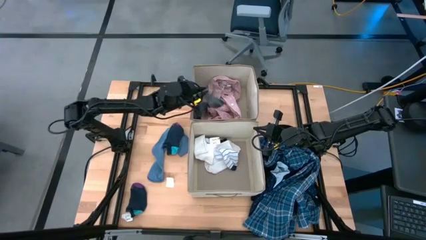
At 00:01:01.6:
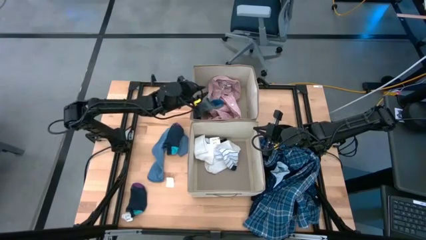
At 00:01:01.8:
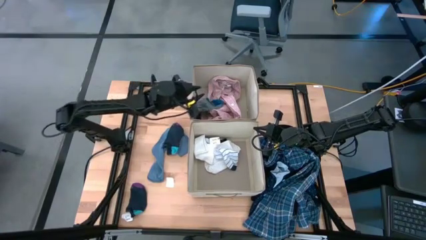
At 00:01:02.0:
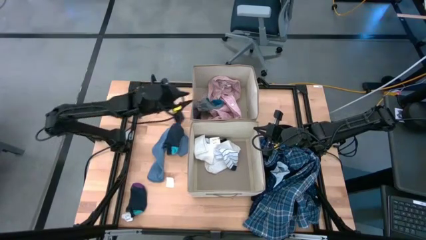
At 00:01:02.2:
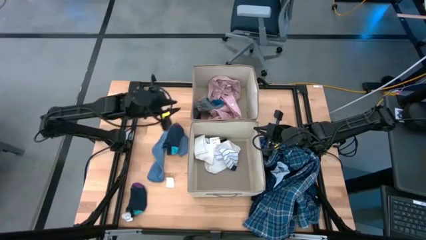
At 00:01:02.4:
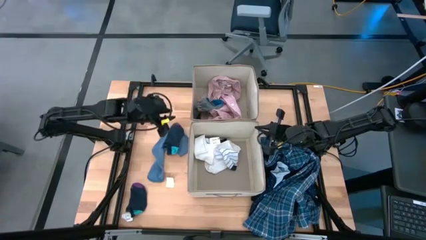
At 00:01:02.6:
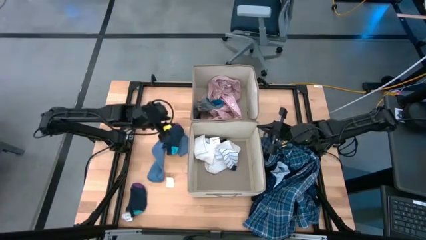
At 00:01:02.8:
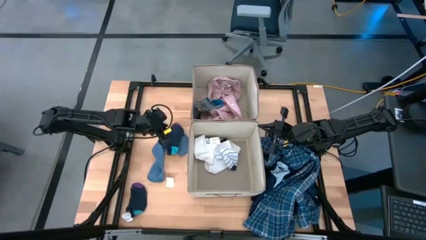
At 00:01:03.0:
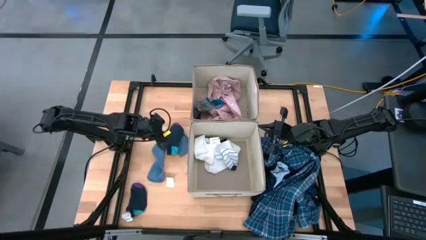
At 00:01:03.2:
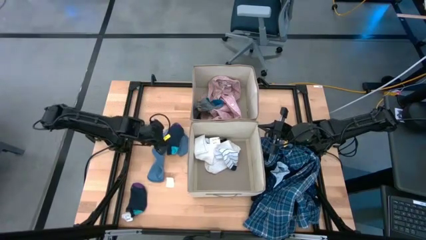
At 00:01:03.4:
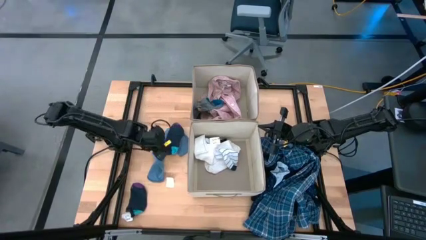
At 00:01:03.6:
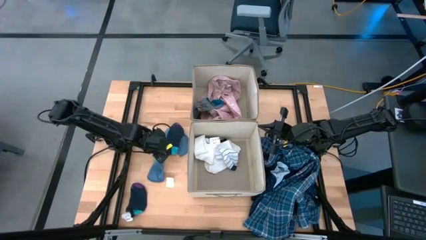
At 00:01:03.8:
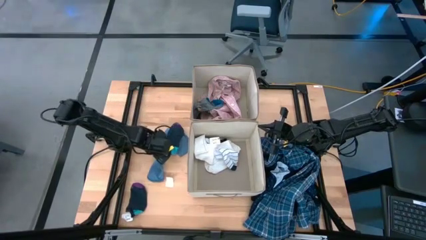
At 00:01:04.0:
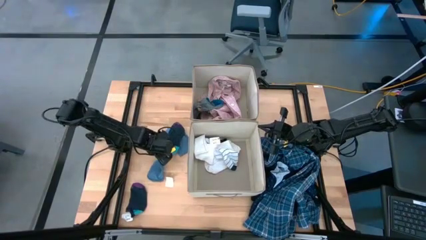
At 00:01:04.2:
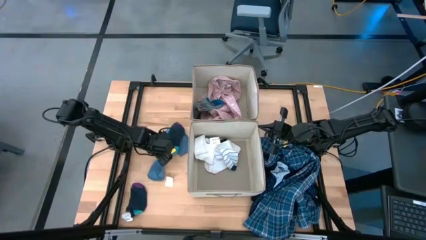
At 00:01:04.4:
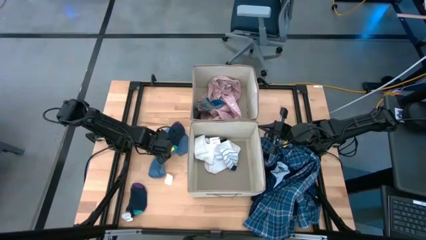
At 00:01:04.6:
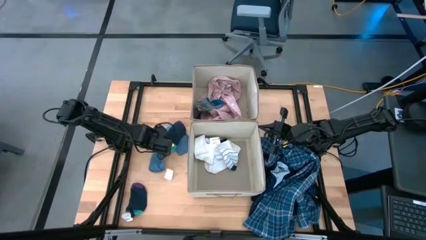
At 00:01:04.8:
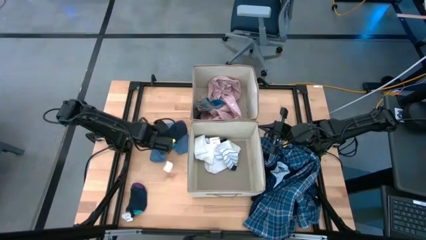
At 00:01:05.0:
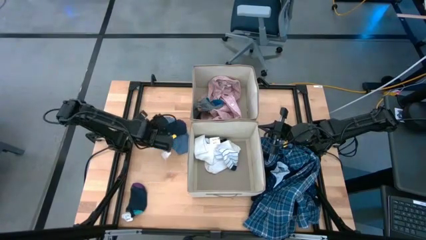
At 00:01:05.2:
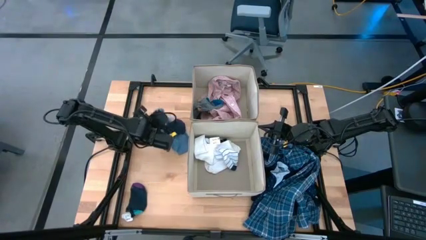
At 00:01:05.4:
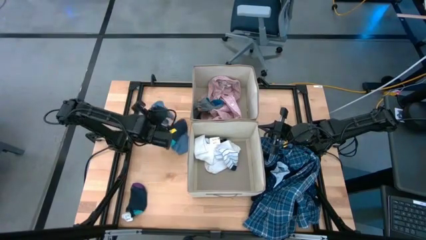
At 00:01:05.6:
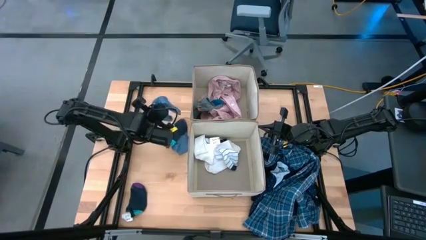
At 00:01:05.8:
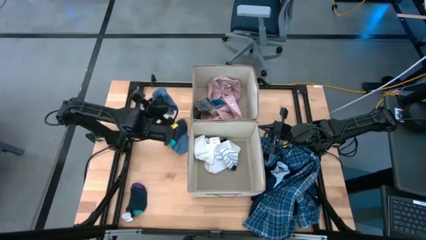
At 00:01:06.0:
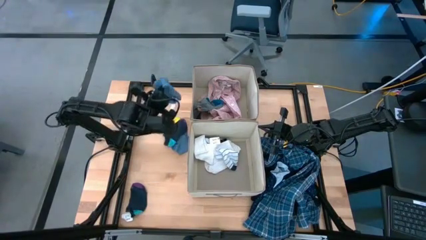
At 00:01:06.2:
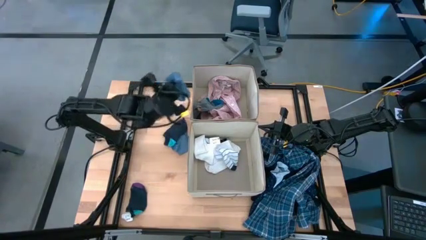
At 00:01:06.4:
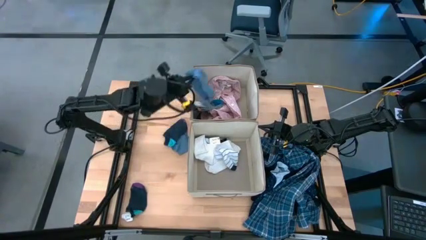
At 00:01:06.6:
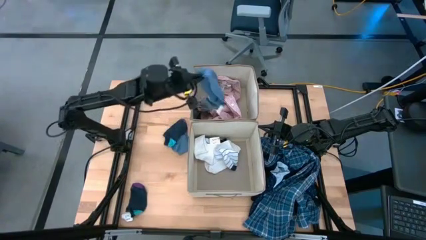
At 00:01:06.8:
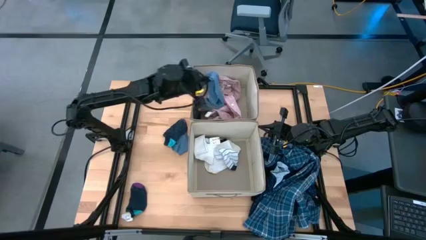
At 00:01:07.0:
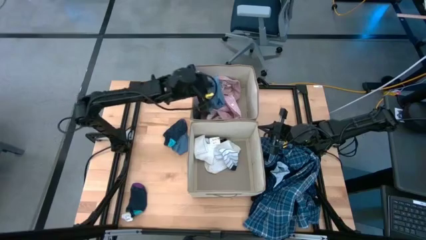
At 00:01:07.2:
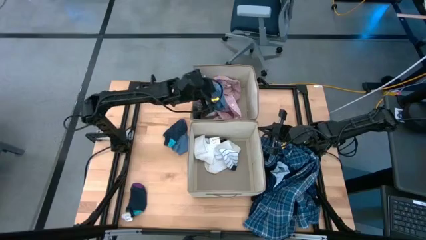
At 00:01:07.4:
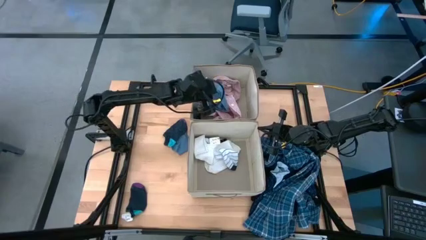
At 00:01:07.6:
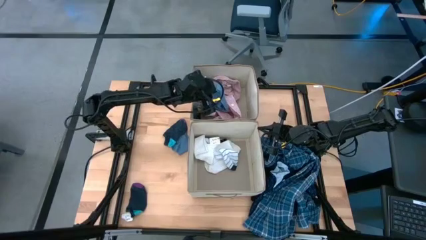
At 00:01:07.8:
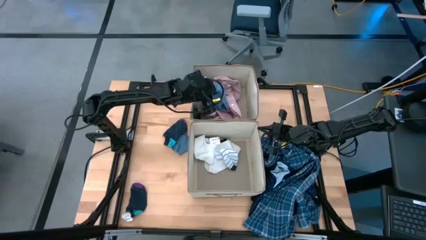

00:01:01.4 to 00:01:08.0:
Task: Sort clothes
Put the blue sock into the top laundry organizer

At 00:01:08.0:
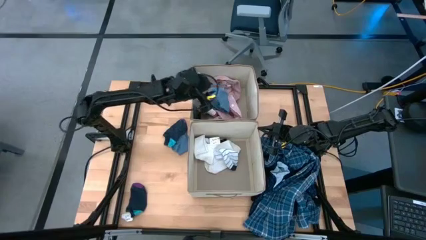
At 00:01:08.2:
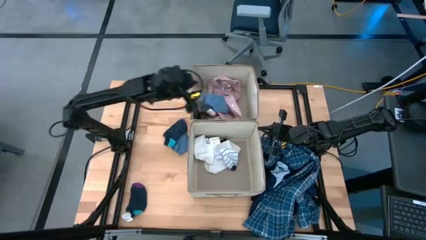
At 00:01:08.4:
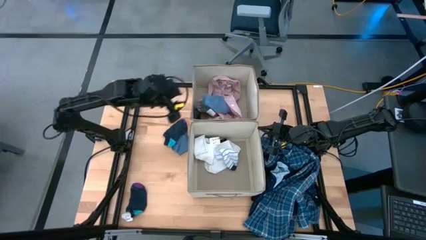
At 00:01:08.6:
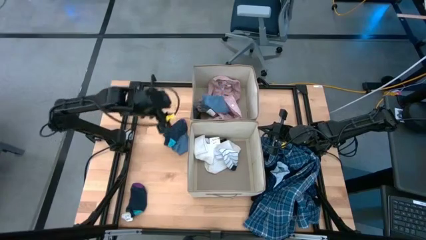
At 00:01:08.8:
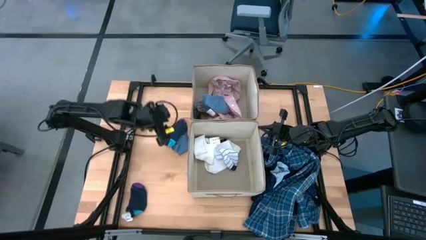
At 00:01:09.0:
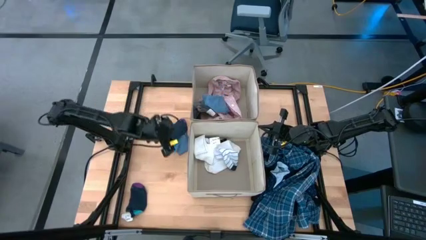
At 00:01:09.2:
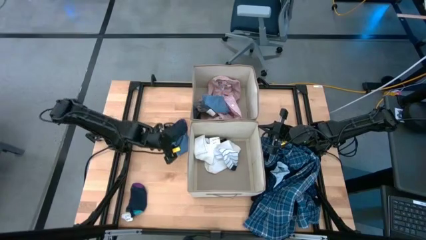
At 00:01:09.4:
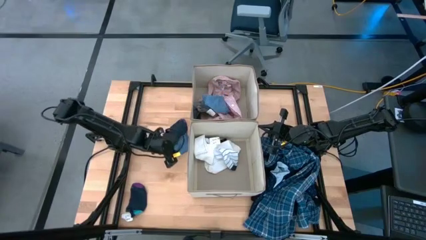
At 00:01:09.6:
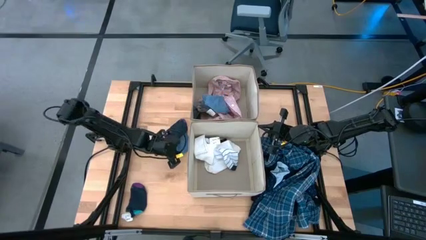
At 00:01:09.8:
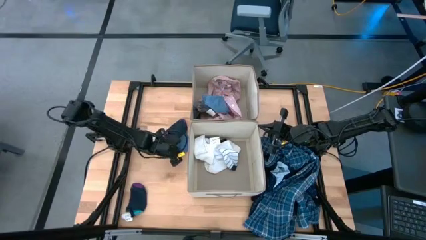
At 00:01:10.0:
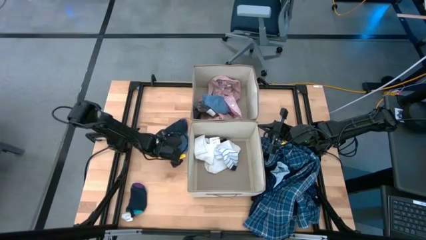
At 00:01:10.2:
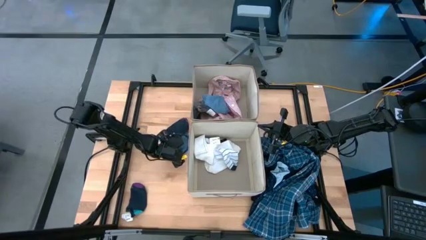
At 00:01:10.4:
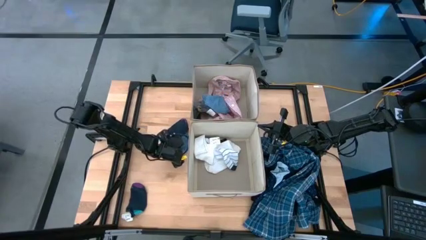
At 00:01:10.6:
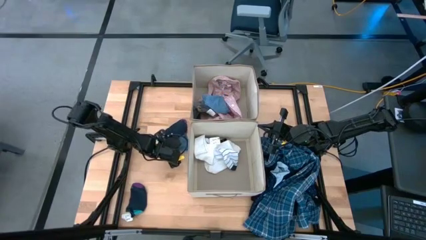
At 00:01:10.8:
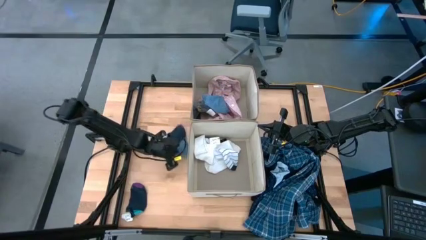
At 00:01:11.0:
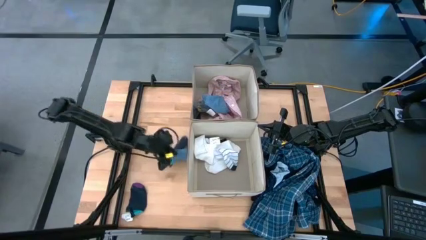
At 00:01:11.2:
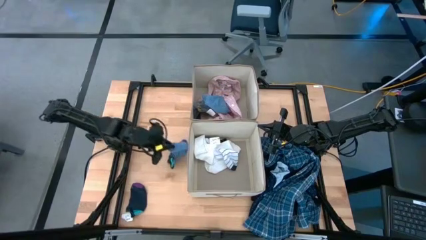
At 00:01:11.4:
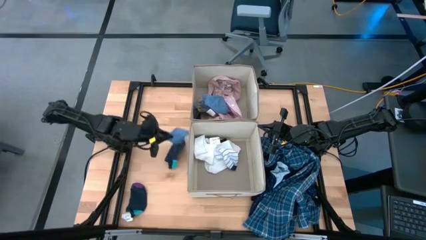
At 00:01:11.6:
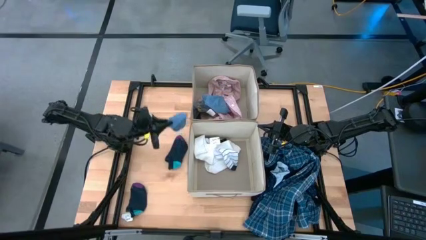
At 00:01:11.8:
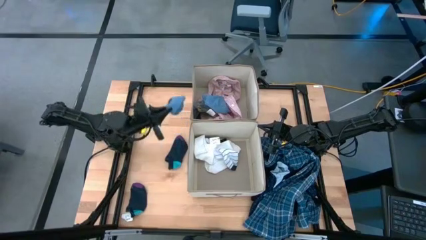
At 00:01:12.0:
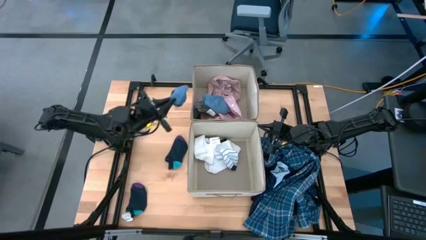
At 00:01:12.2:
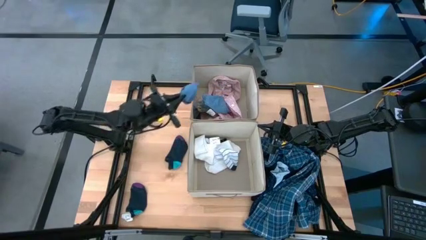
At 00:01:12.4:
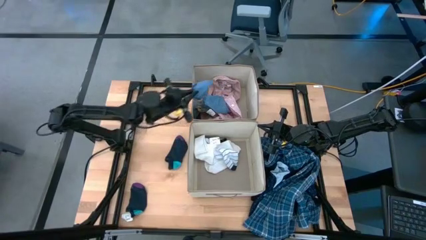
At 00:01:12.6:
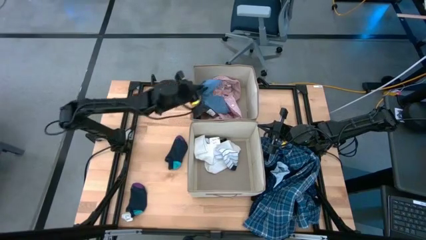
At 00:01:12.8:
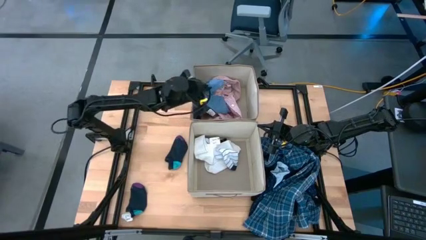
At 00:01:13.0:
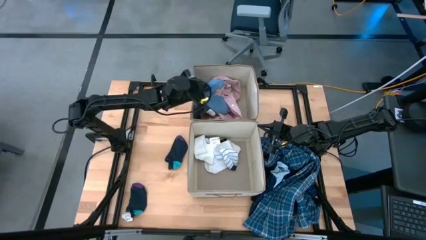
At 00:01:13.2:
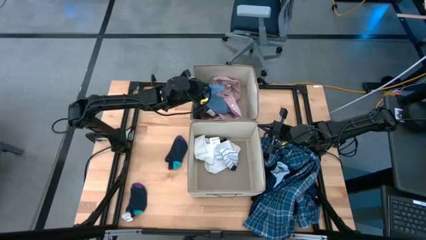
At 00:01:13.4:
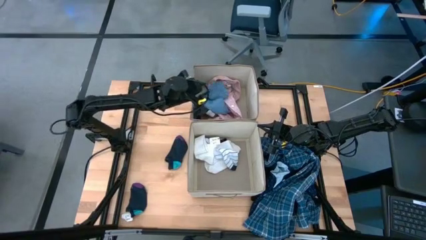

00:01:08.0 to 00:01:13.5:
Put the blue sock into the top laundry organizer

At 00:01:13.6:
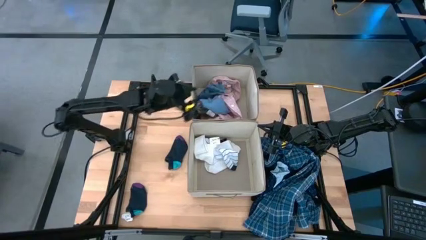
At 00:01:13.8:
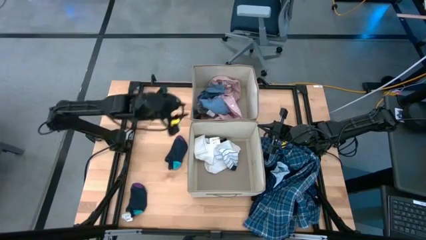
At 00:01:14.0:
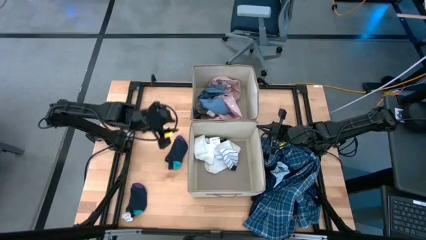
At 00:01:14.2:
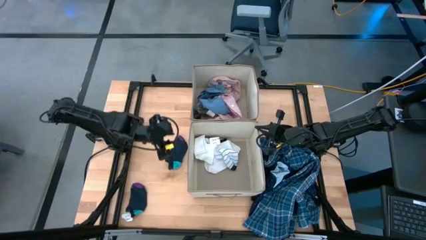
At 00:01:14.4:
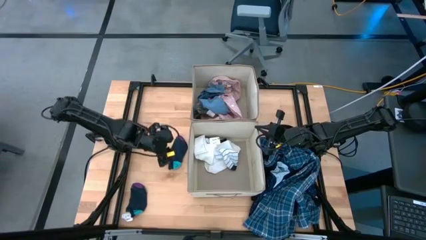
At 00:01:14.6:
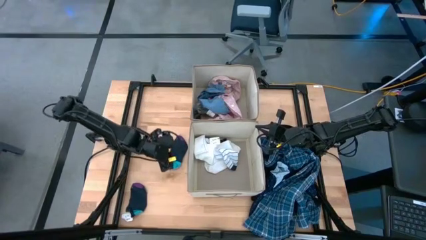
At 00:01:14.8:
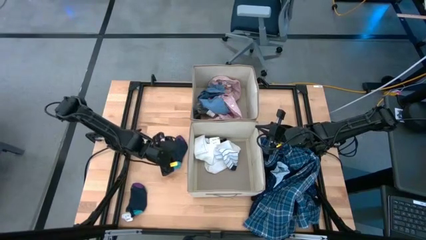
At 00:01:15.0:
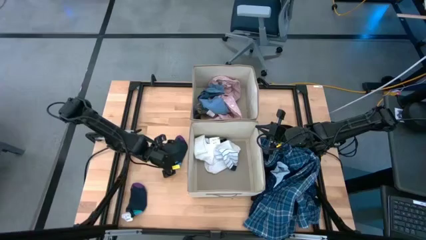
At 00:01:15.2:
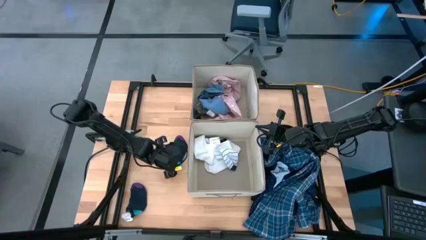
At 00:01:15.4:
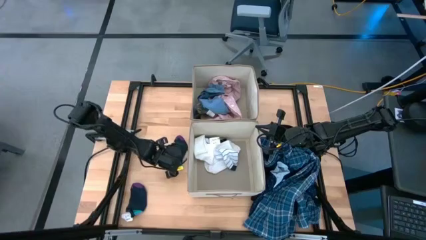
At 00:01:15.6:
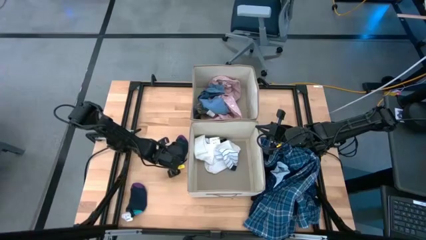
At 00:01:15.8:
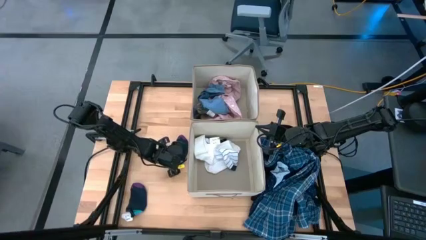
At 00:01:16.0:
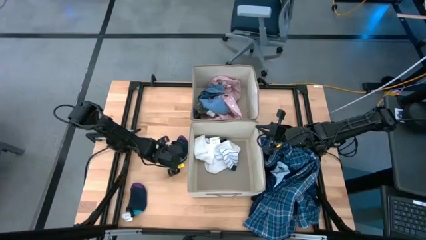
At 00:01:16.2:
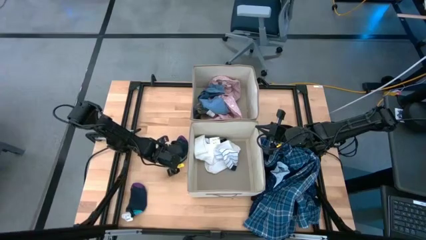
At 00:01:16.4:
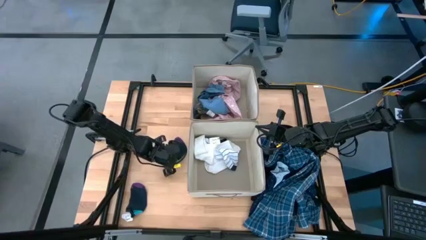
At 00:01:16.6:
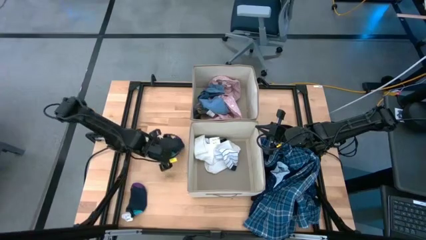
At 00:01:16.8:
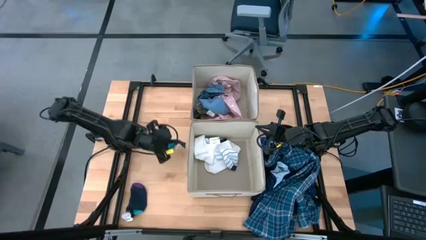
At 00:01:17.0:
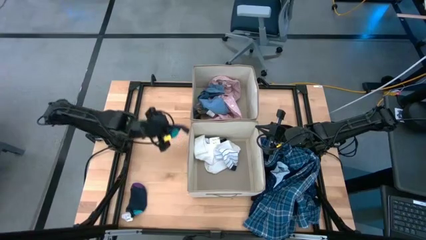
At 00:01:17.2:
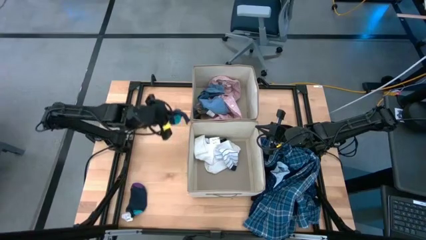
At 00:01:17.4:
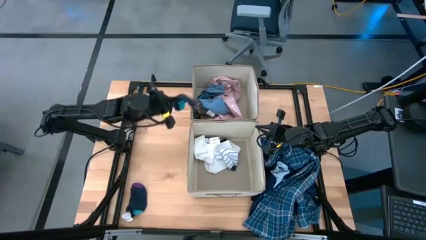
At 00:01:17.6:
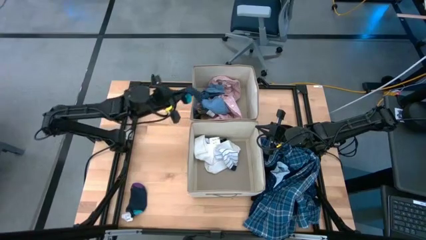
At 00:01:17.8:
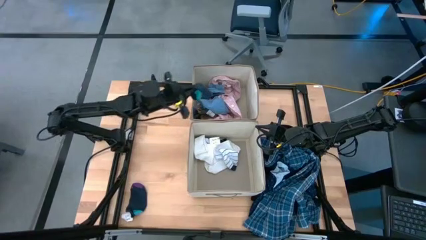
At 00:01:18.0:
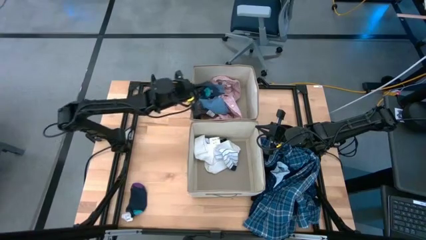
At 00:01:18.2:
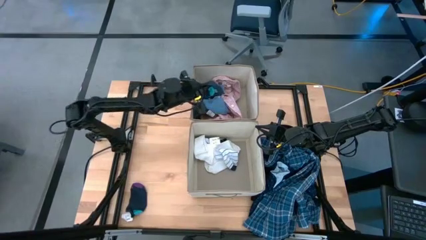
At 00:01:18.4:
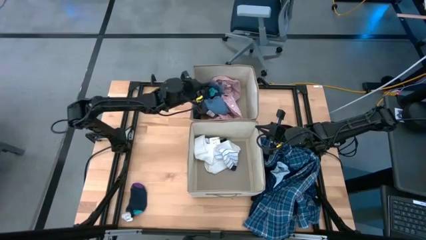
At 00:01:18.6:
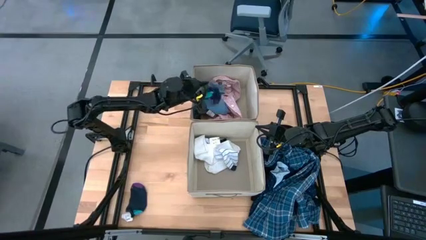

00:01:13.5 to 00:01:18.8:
Put the dark blue sock into the top laundry organizer
